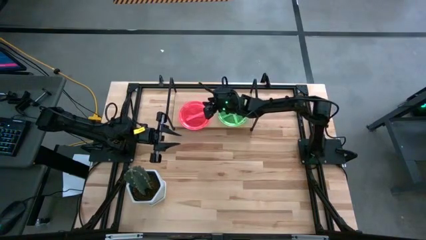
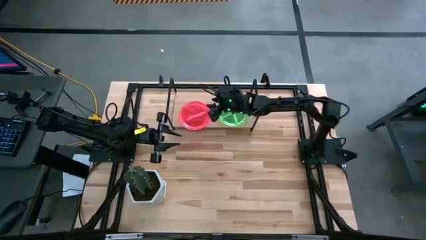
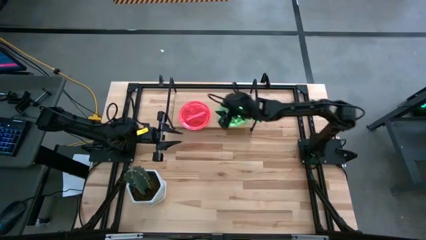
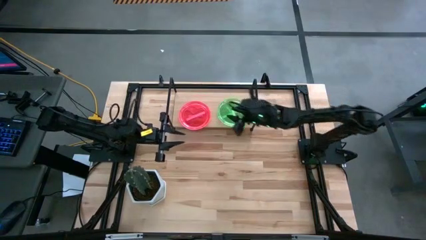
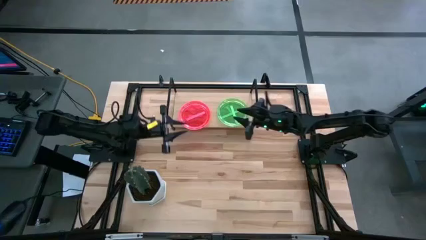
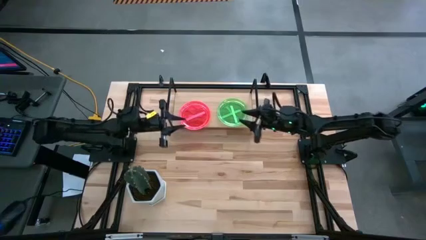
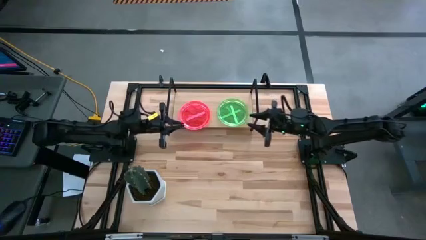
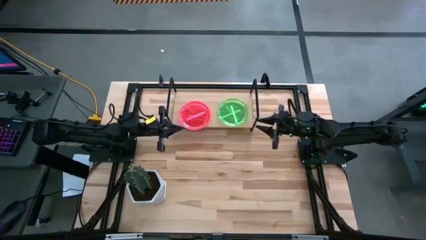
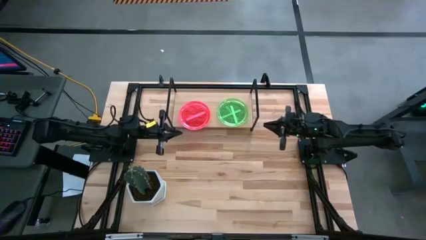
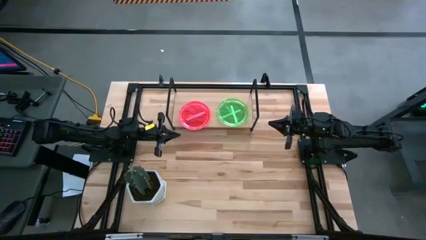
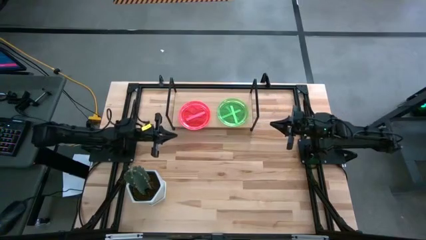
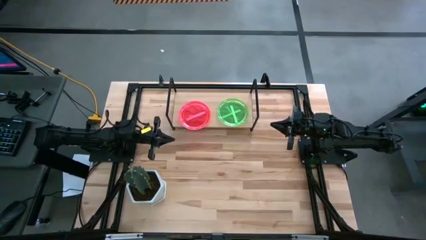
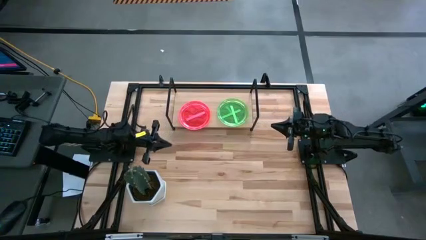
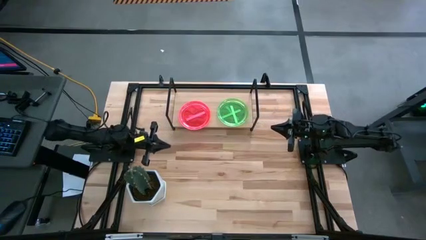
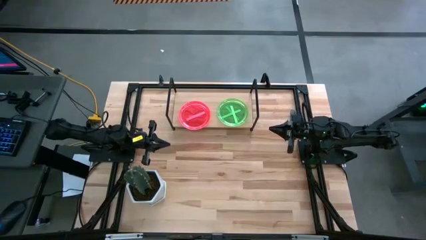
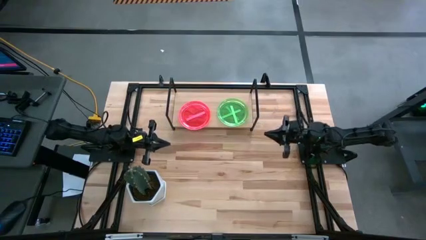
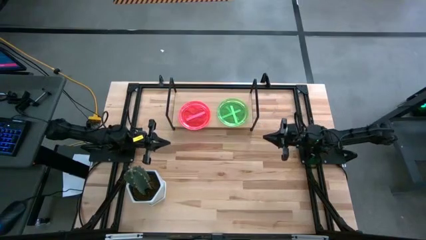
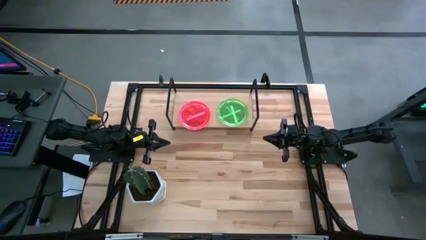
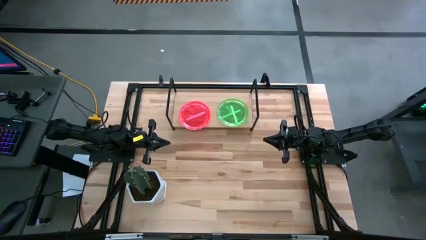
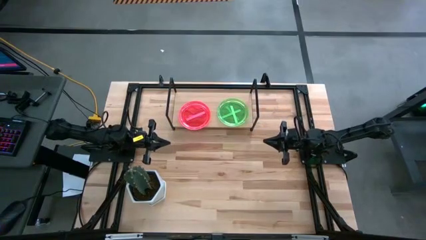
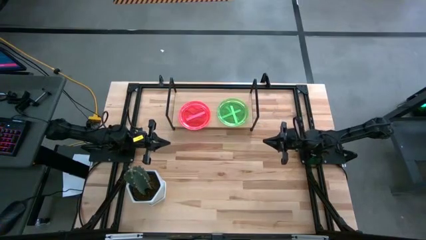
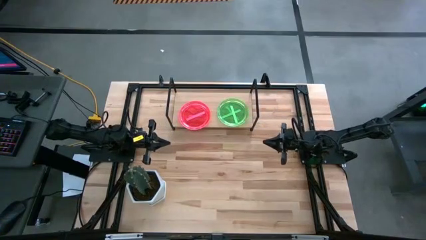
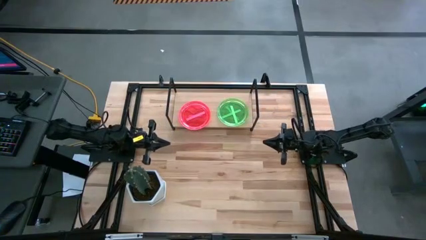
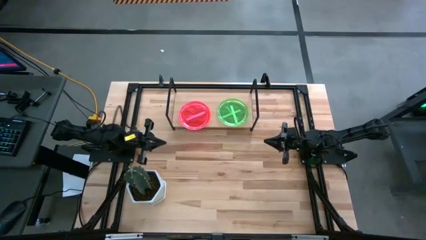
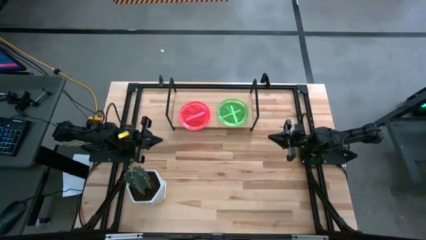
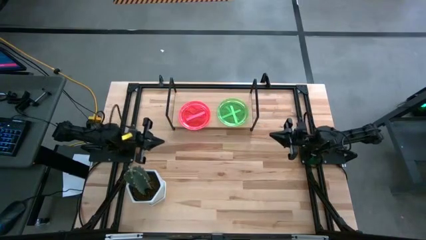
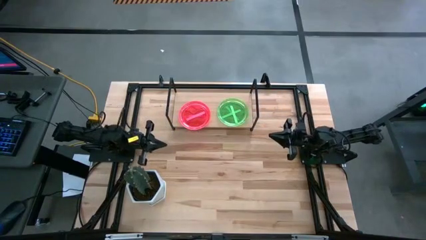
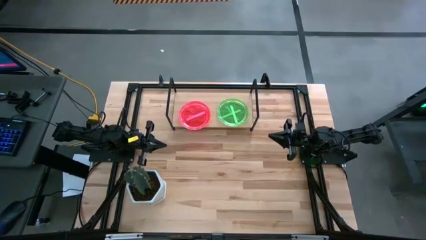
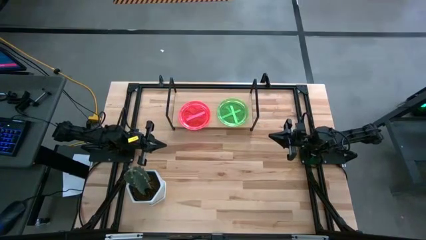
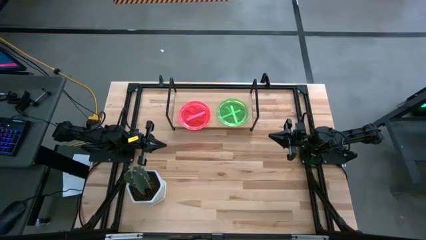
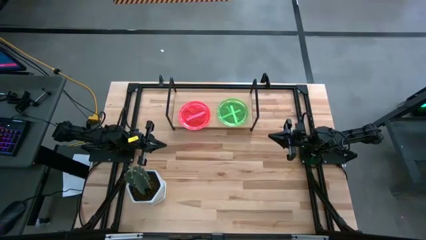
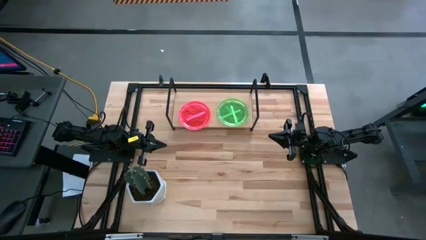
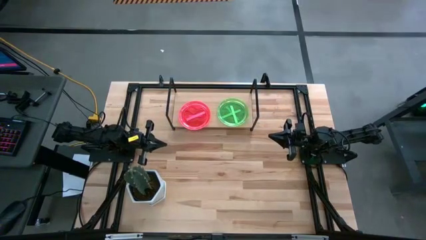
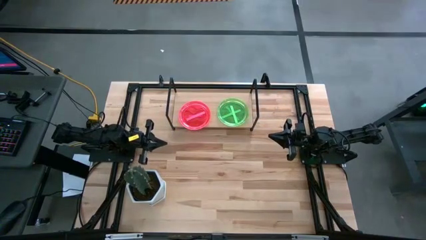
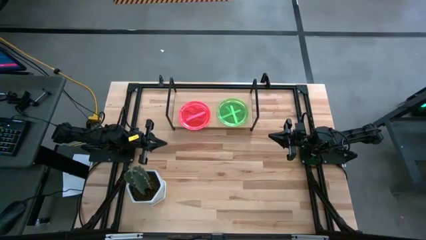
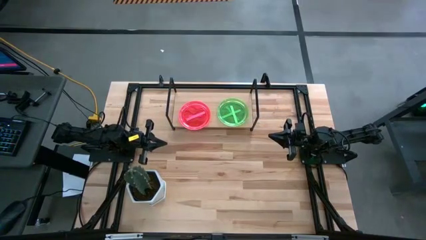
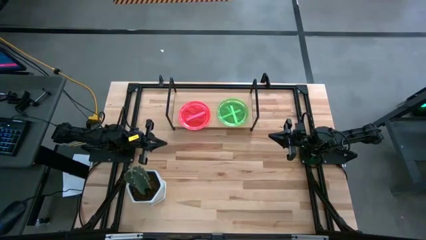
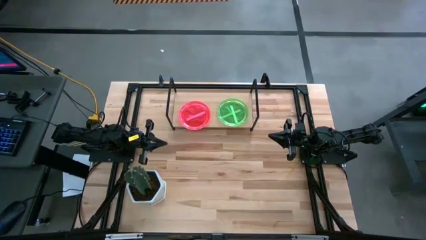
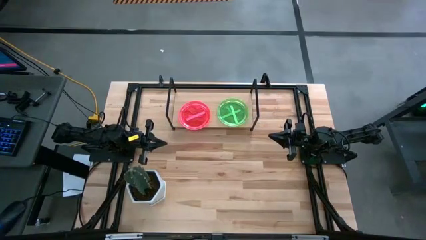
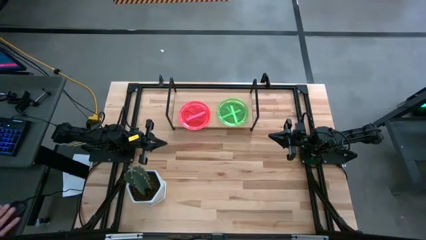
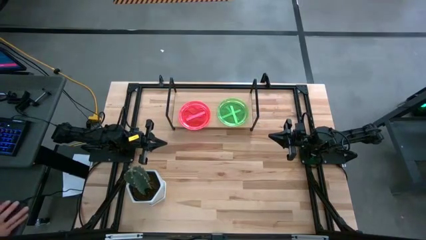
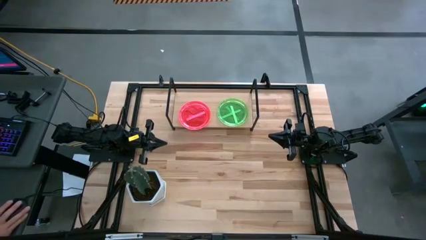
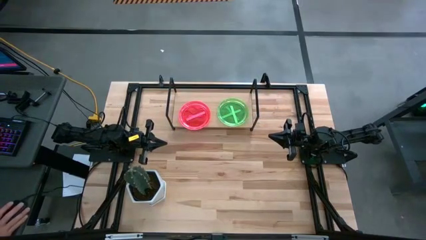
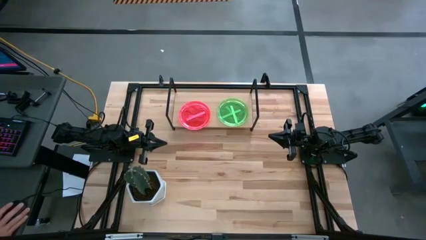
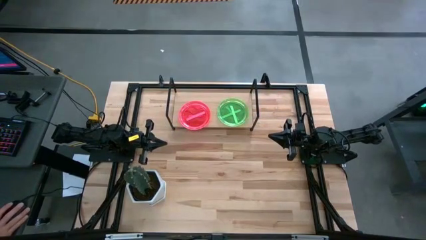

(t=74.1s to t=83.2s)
Task: Place and stack plates onto a shelf
Return to Home Position

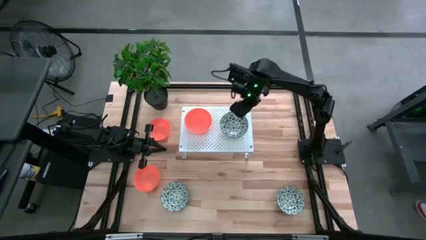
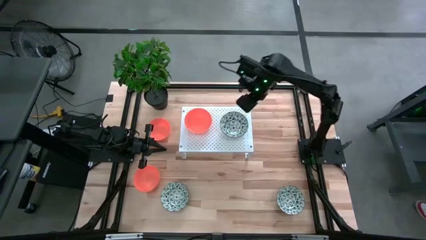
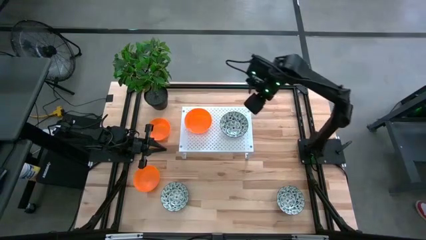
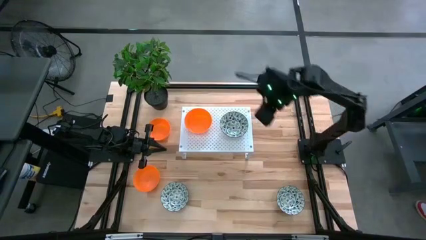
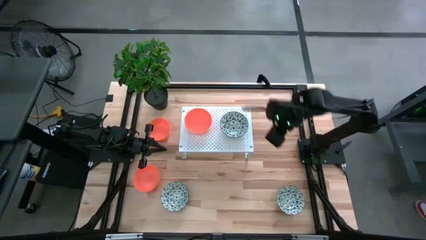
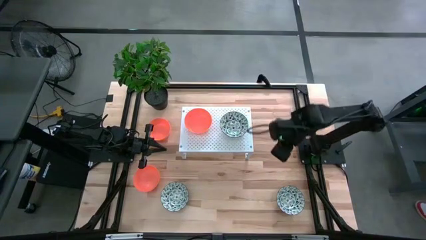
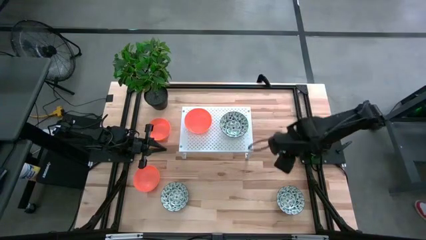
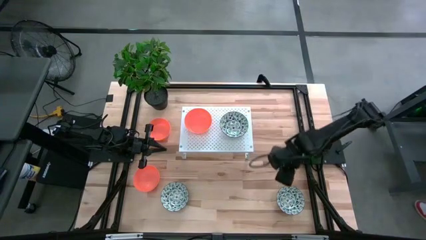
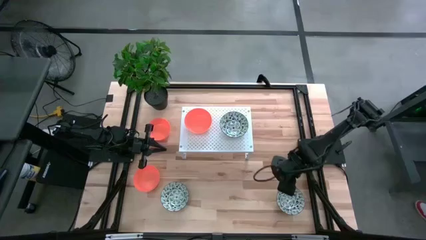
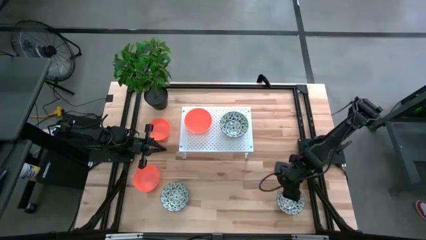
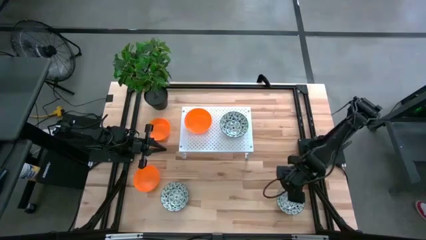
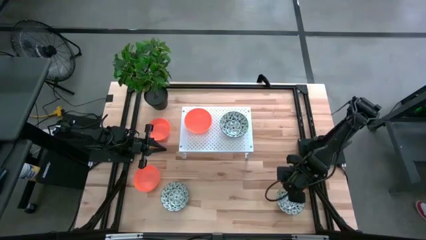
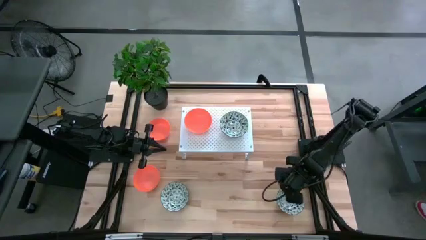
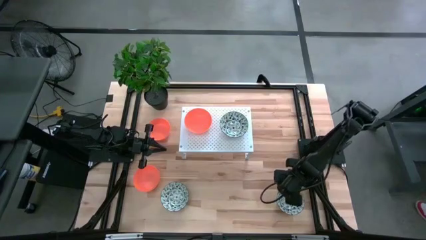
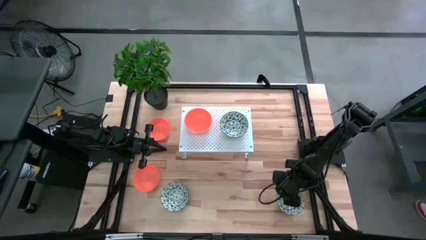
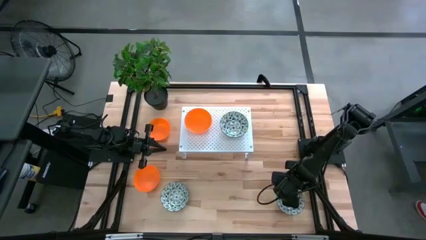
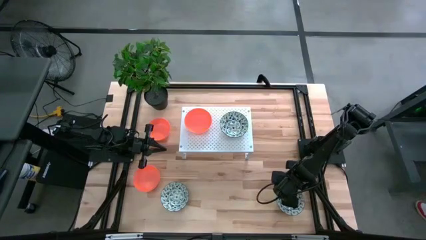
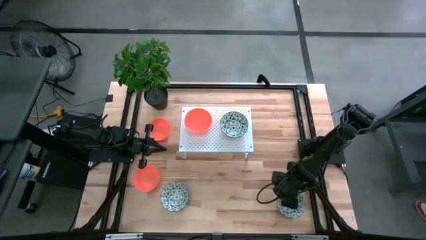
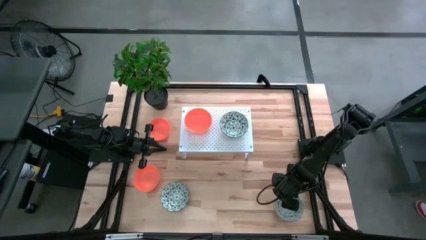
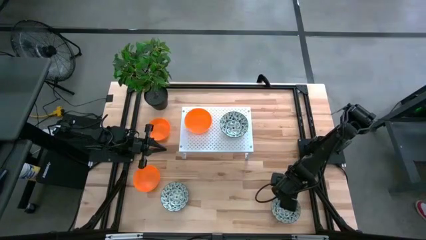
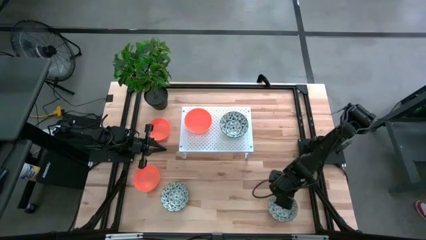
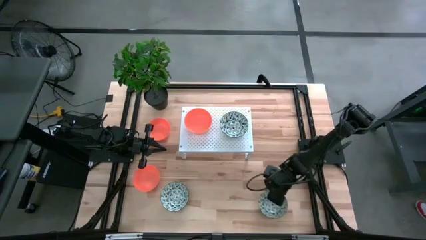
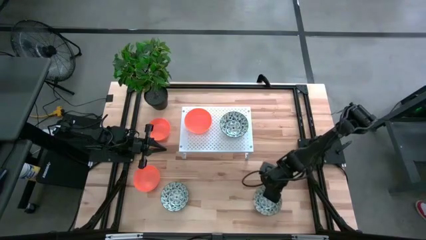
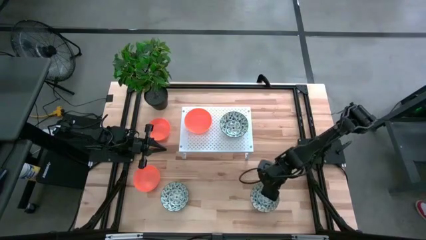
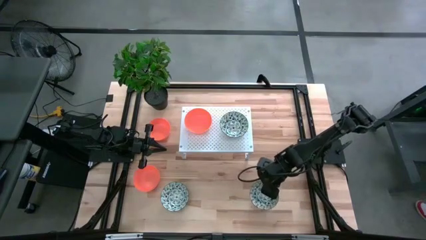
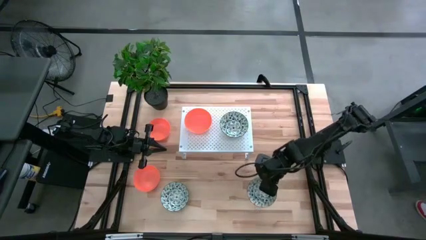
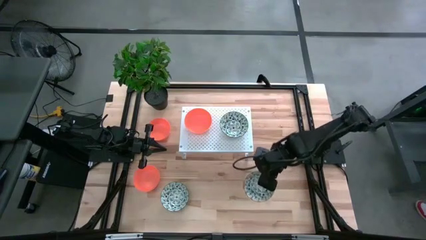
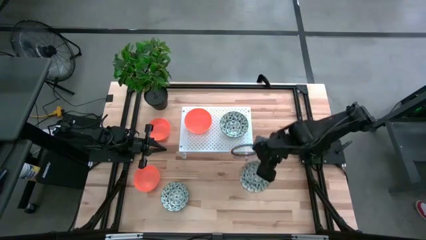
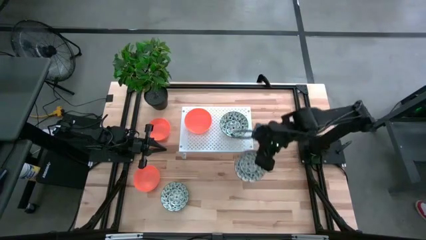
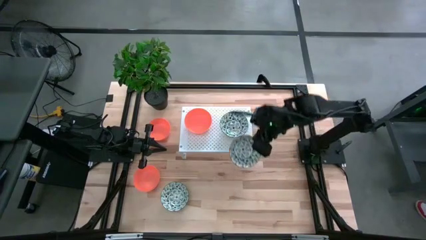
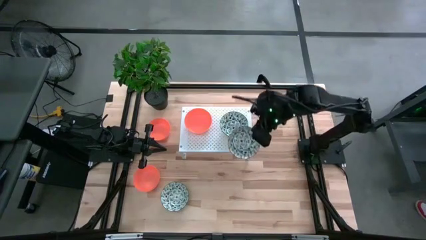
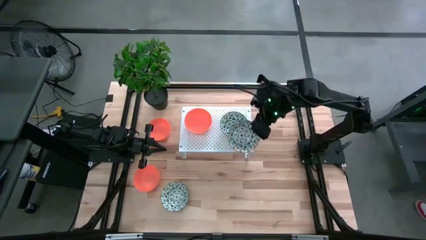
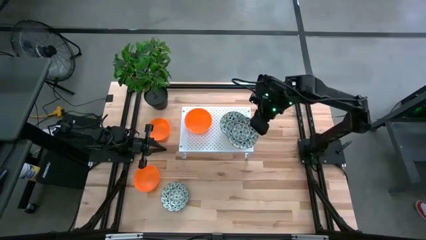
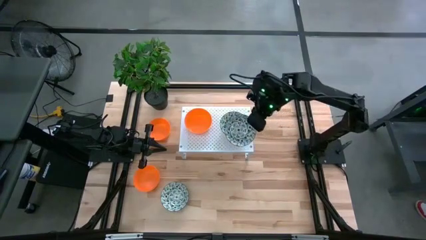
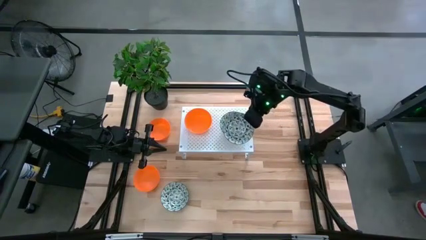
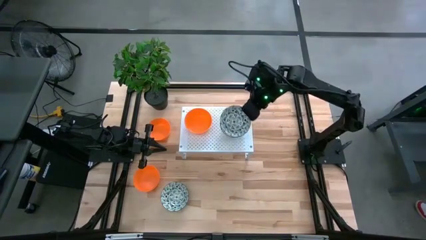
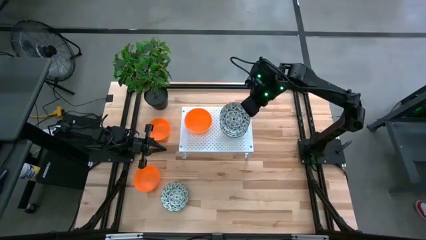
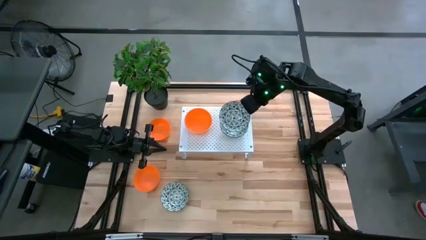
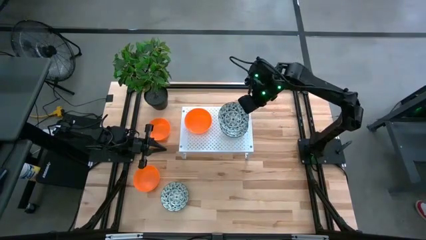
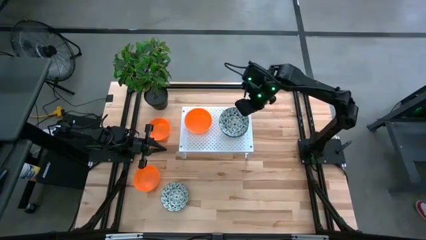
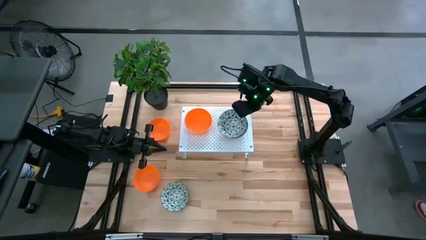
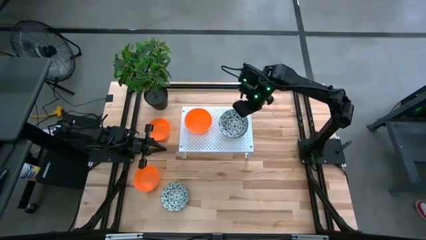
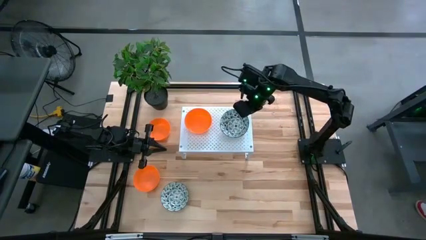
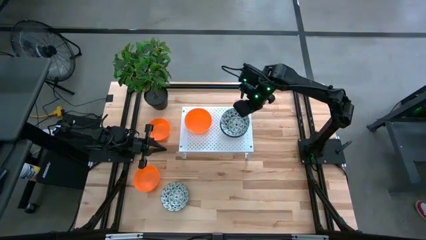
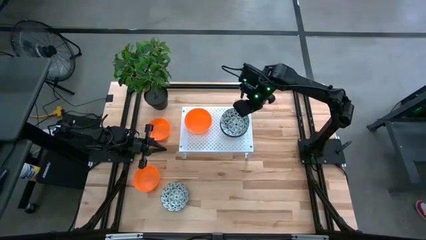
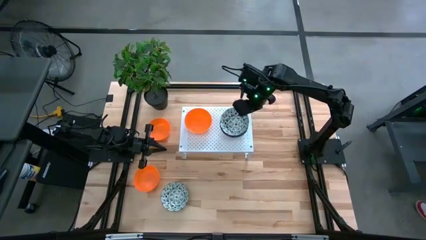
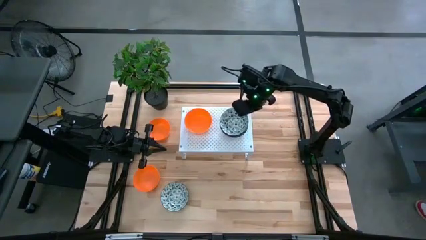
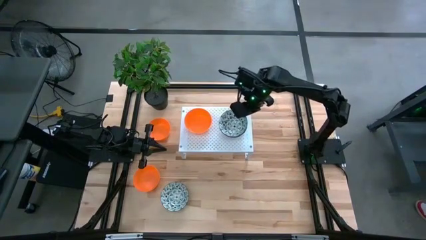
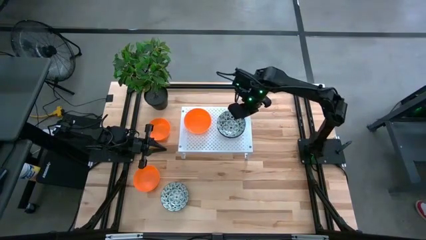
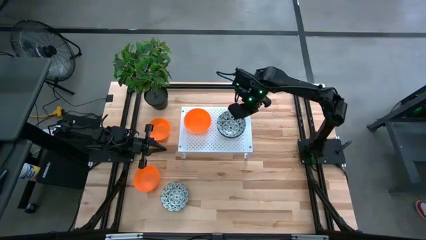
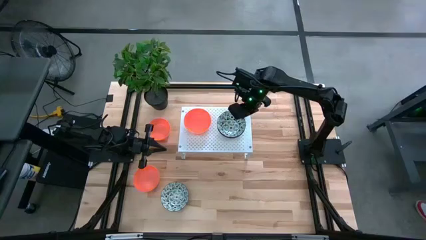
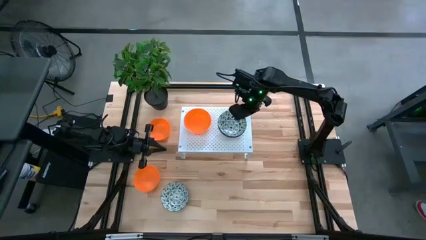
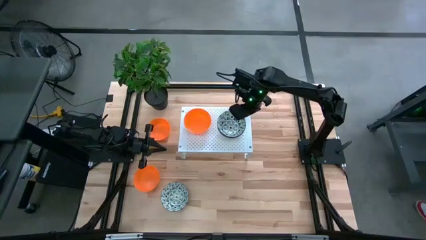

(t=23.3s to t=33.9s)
Task: Pick & Place Mini bowls
Stack the right blue patterned bowl on the blue patterned bowl on the shelf
